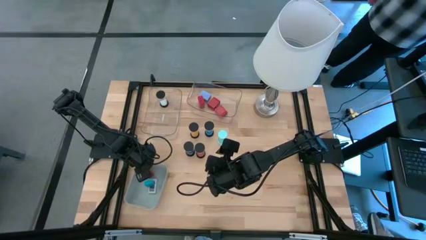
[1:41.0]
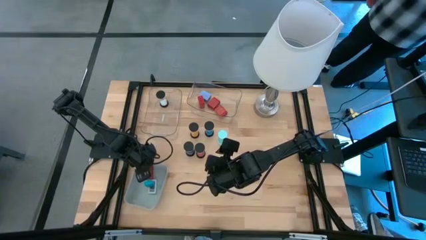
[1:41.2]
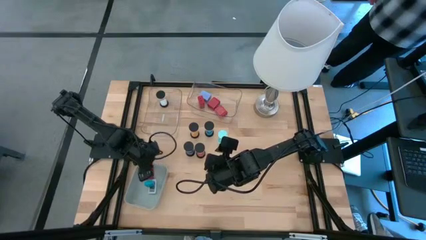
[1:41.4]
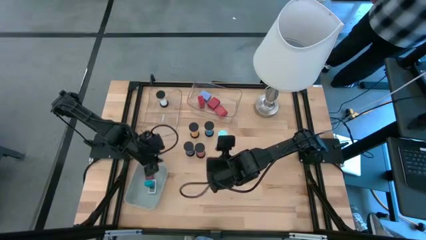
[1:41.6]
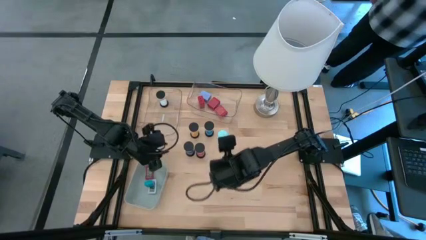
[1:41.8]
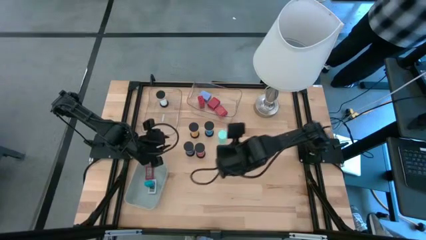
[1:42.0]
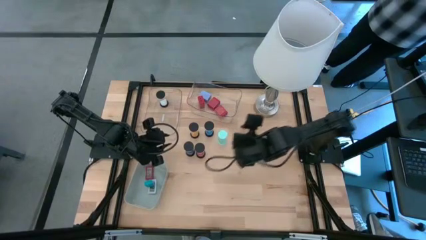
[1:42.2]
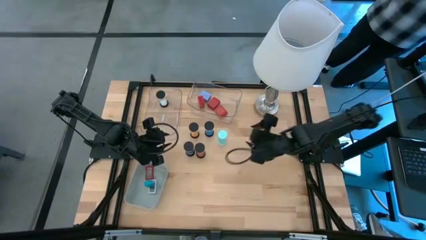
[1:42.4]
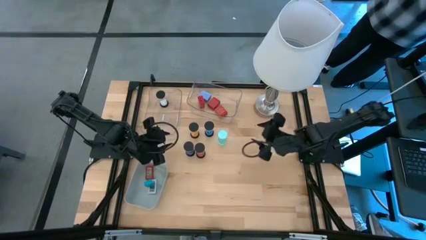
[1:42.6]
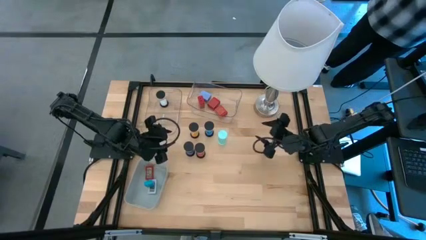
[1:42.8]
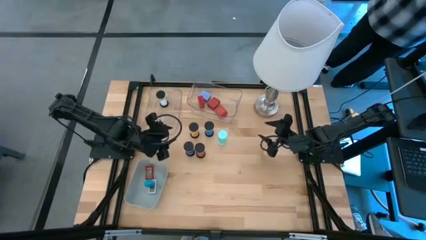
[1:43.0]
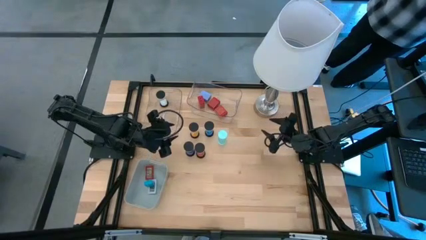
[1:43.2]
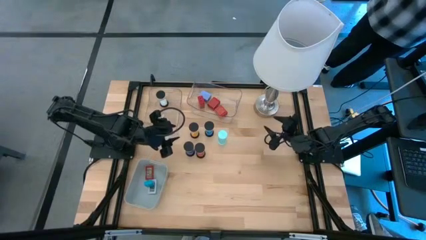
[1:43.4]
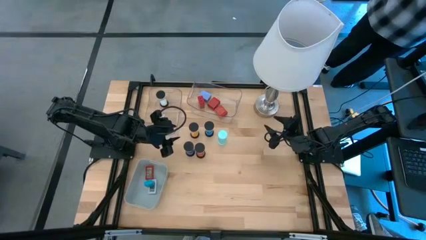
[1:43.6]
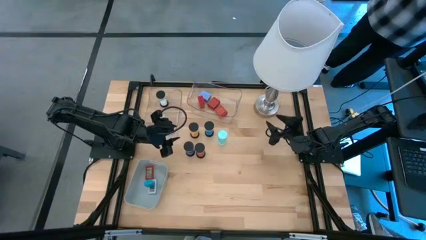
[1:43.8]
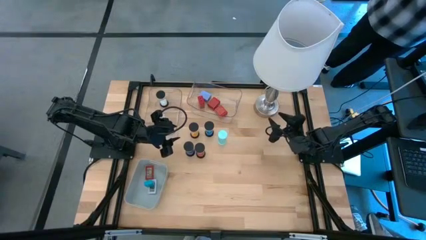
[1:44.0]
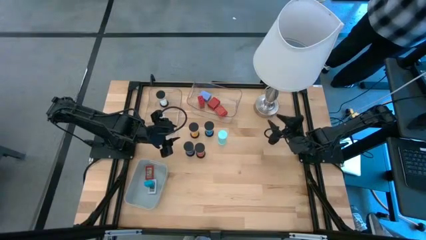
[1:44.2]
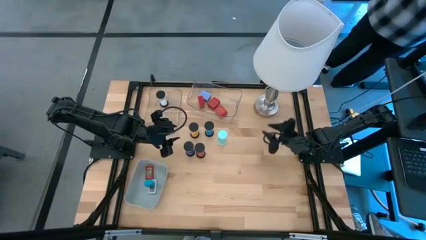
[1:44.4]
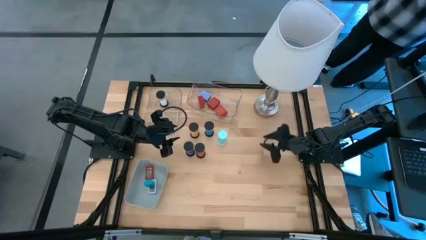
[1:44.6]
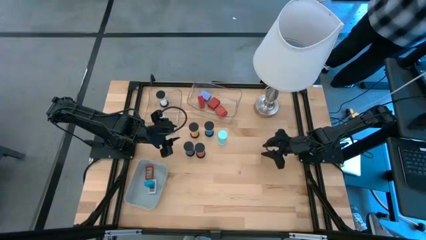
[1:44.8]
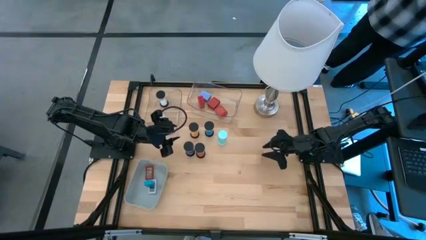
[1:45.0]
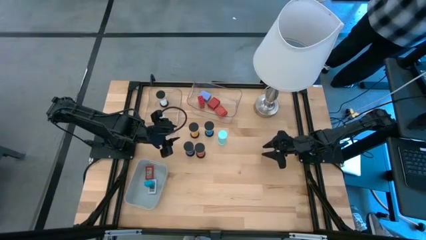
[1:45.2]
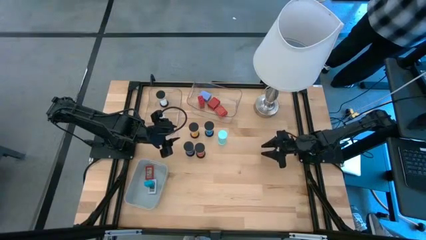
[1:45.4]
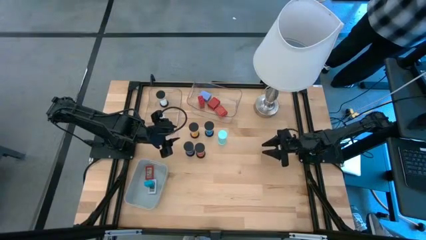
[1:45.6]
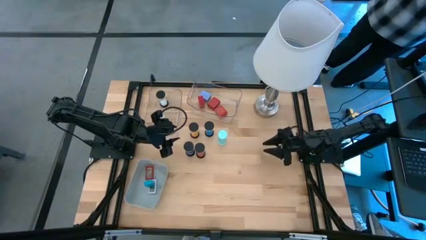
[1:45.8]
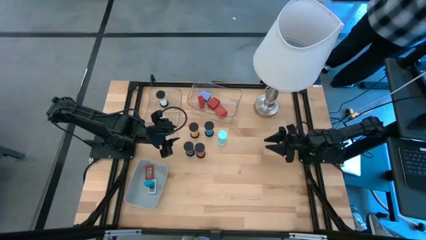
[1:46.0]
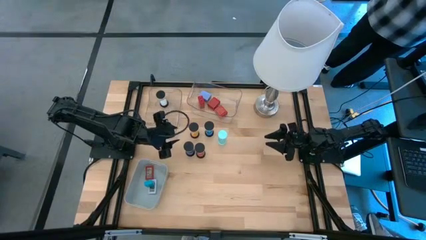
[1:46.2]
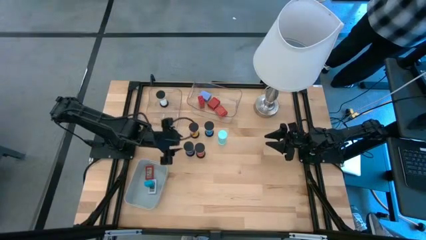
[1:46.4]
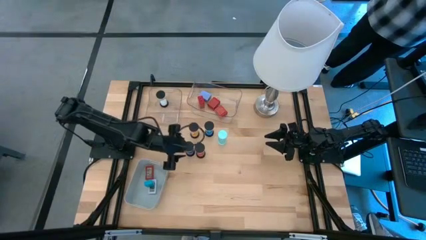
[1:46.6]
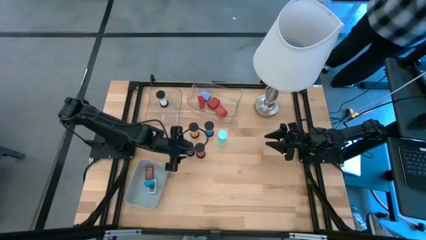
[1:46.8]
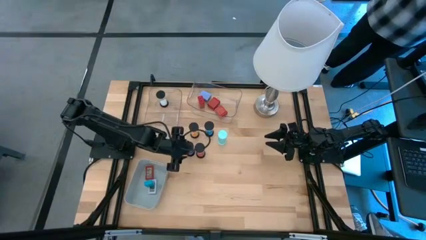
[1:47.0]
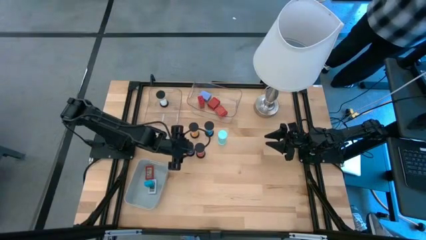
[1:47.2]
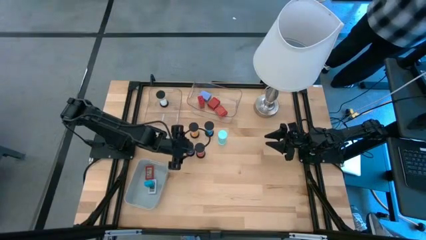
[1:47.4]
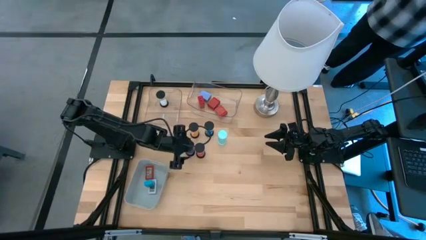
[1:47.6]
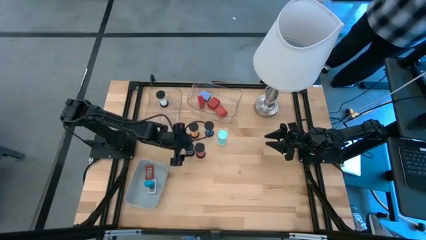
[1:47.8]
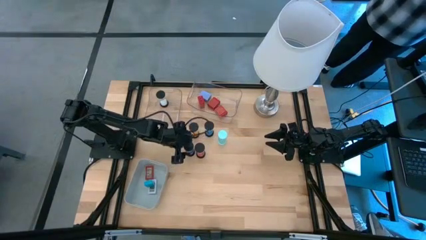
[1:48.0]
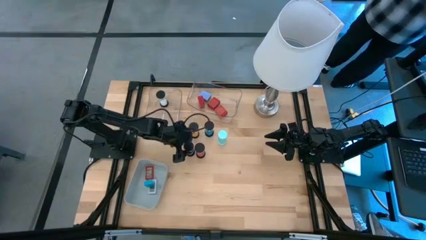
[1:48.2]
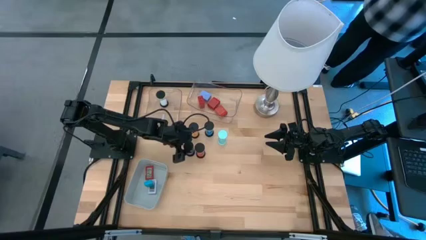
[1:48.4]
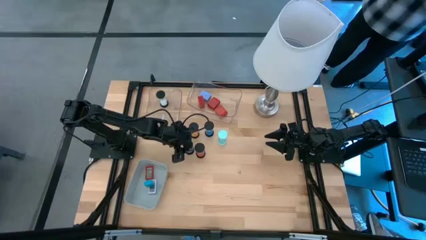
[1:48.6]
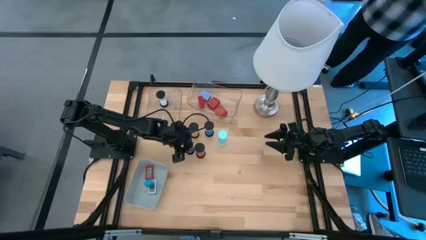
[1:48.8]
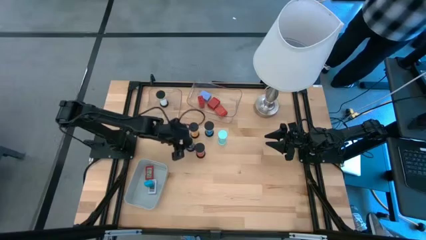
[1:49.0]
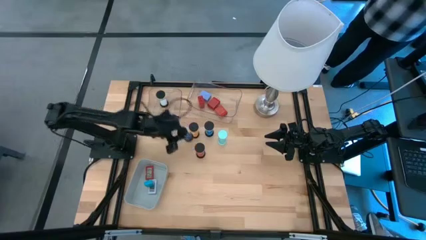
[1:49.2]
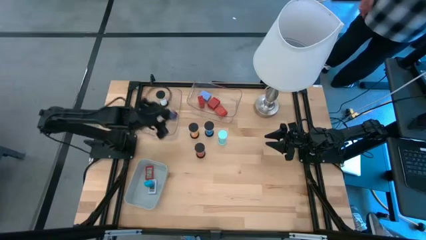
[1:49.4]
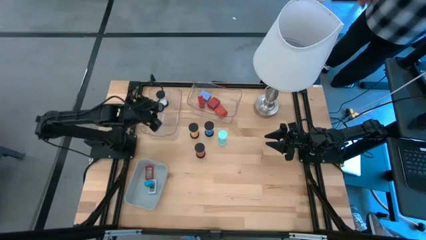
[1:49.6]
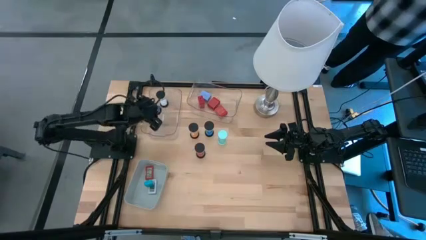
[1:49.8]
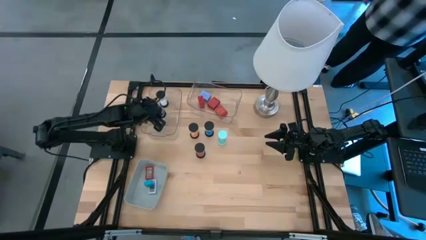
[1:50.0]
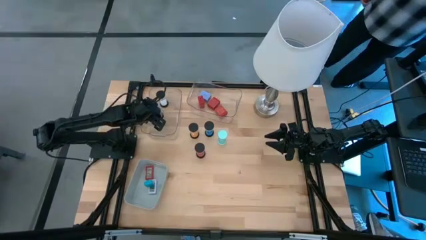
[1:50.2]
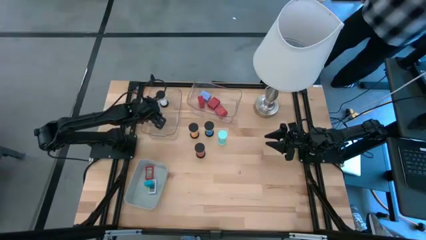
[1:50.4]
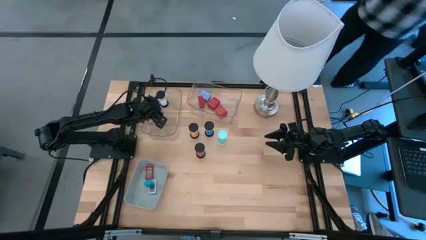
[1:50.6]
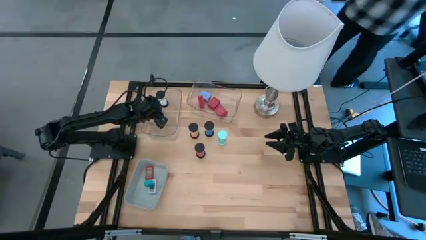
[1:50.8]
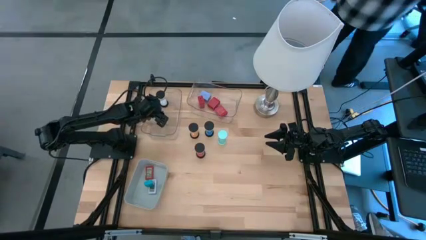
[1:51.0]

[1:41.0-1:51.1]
Task: Pick & Place Office items
Put the dark blue hourglass into the left transparent bin

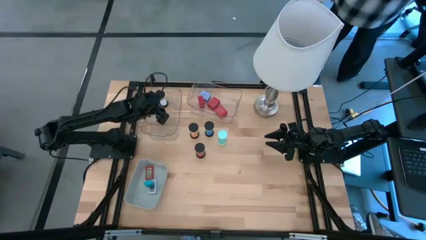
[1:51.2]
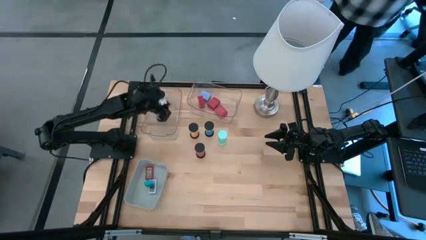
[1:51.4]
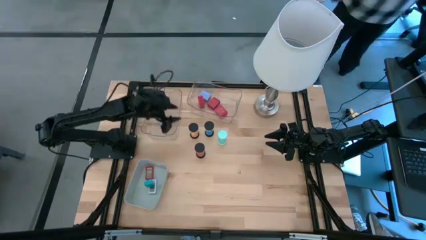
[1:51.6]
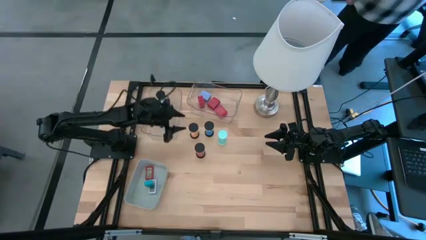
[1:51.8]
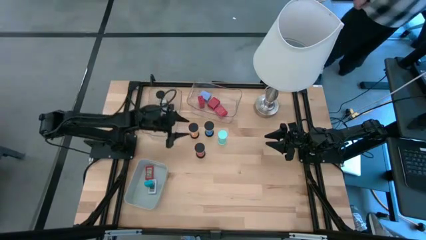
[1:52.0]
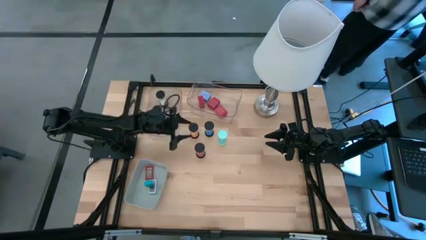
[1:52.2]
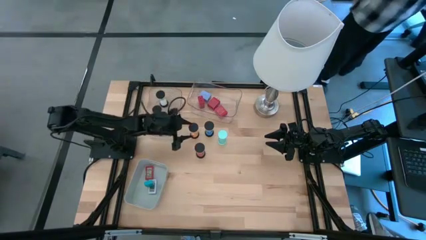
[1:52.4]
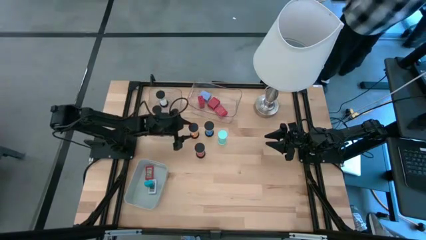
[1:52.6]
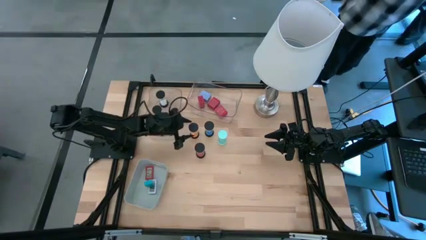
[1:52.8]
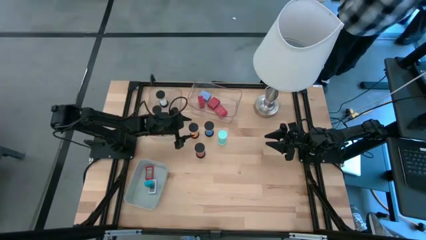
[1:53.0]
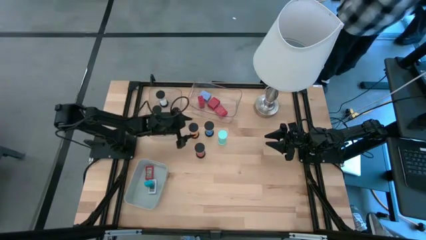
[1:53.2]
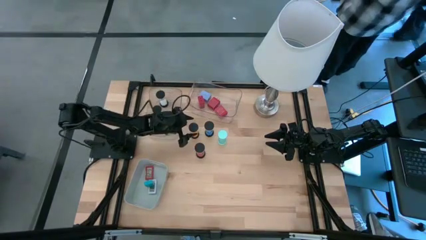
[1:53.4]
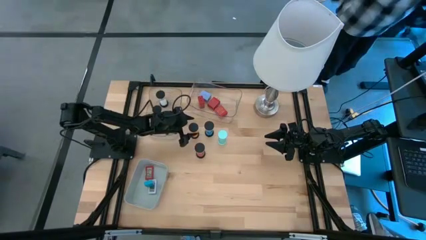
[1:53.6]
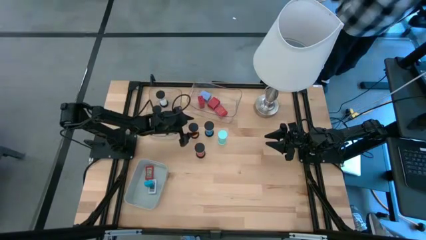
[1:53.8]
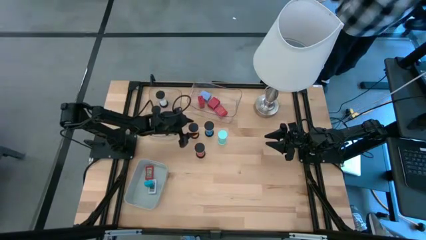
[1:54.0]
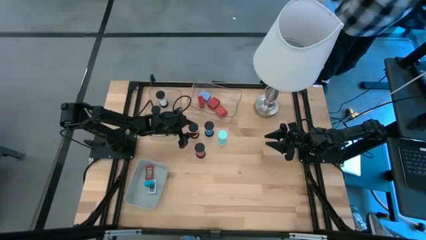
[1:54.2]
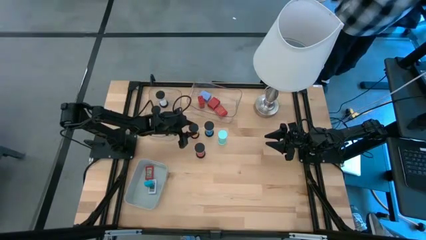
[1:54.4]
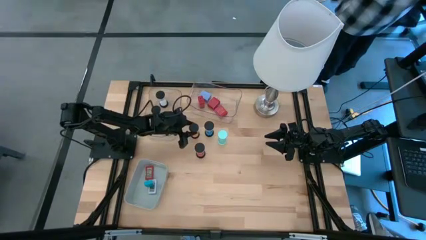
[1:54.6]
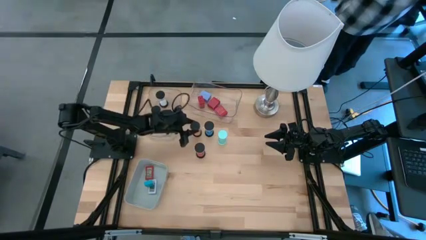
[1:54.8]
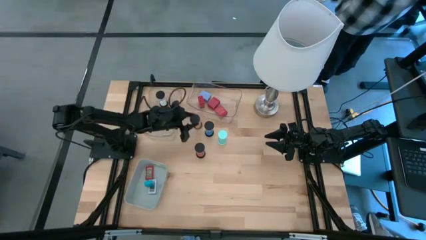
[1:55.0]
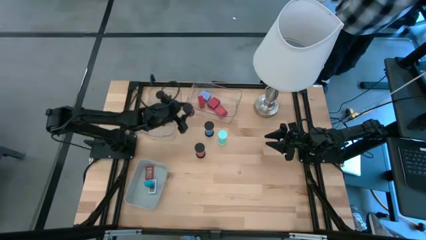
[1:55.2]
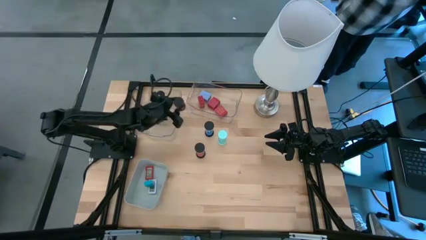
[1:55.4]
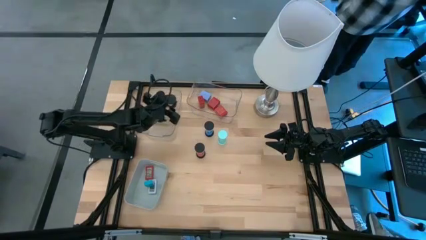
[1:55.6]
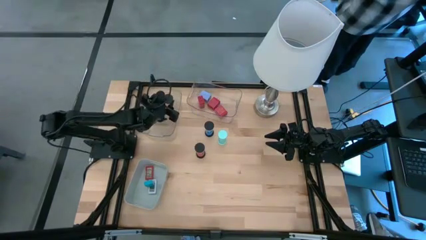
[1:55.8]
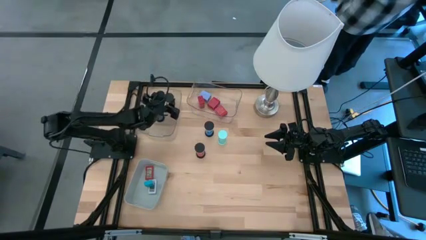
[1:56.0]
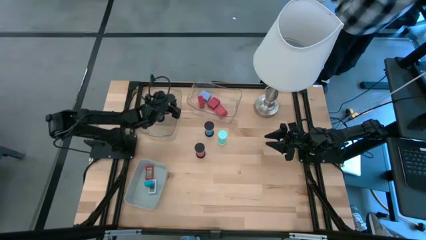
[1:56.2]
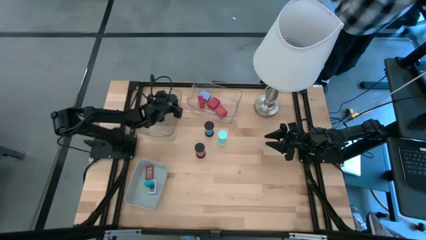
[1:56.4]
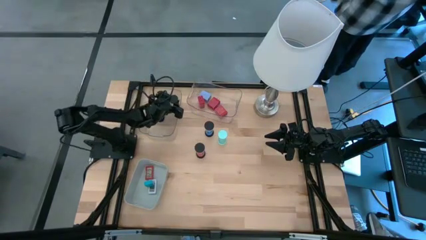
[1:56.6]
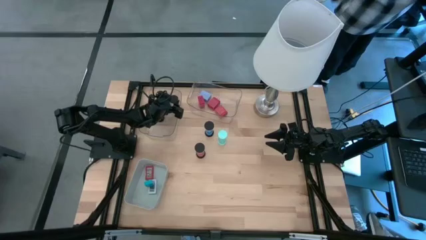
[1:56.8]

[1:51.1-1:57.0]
Put the orange hourglass into the left transparent bin

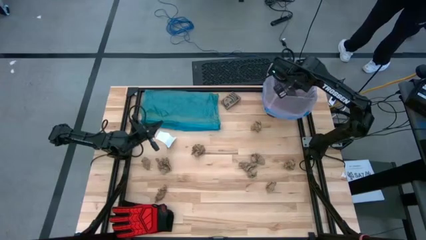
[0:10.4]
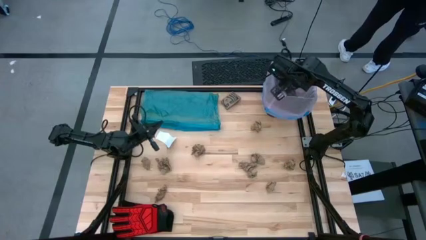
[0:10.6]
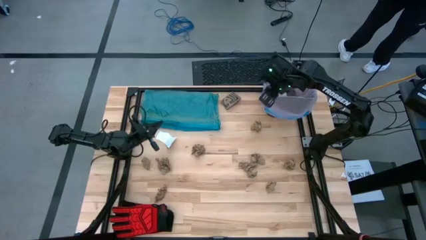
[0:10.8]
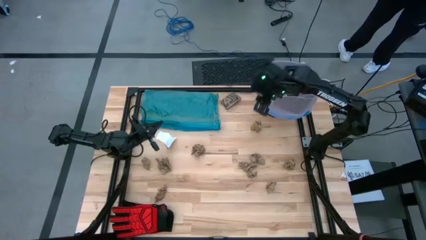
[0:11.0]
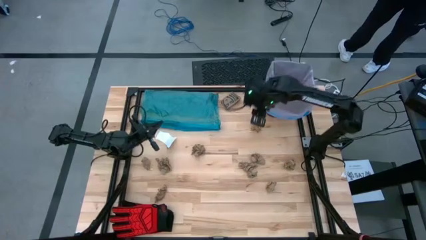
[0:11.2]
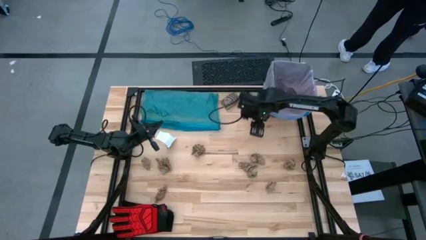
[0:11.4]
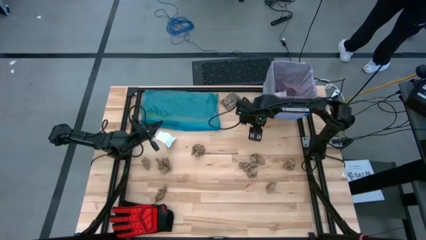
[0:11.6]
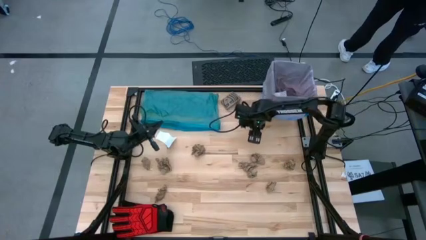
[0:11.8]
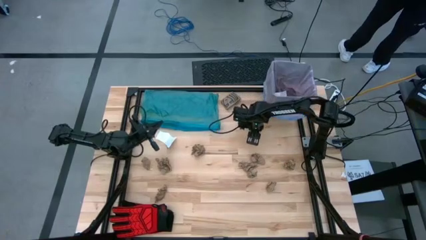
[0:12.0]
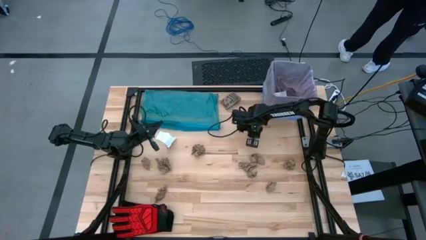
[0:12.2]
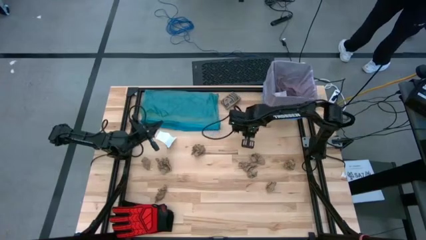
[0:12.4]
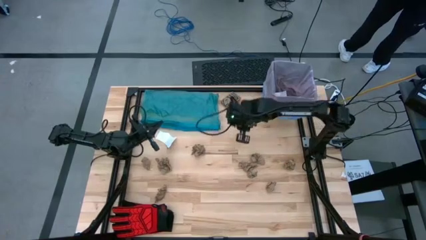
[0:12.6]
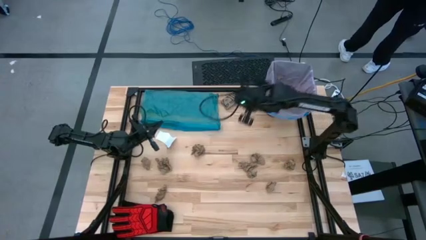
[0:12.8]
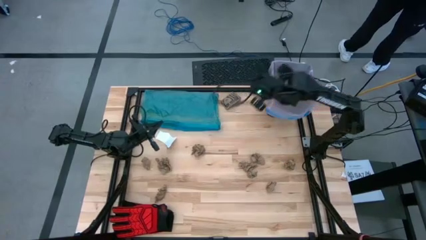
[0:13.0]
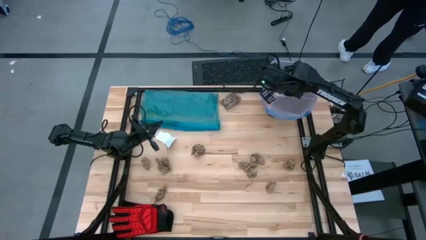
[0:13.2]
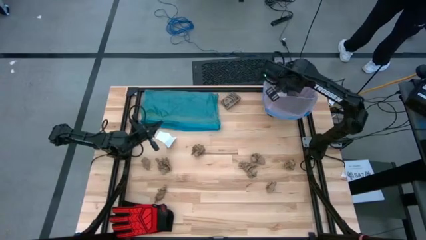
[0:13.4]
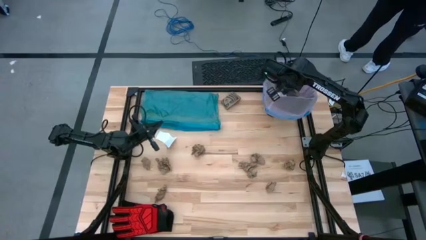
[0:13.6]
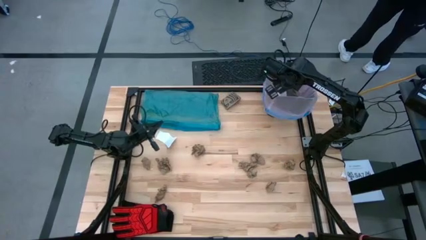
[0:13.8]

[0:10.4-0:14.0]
Task: place trash/remove bag and relplace
Put the brown napkin into the trash bin
